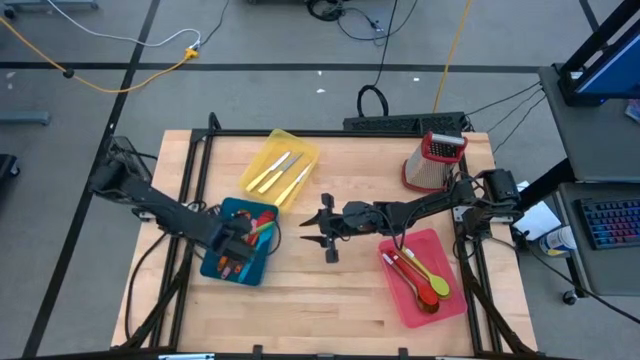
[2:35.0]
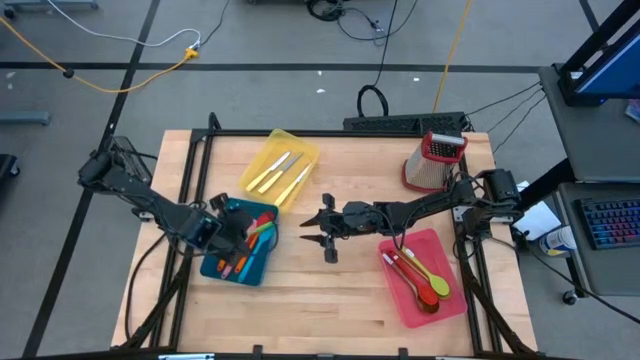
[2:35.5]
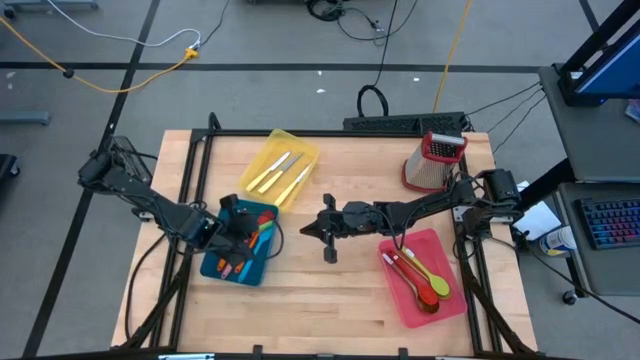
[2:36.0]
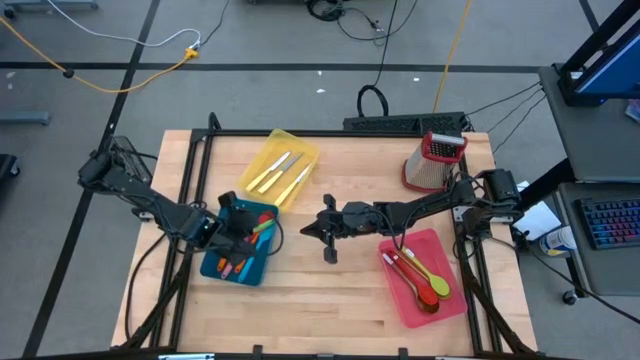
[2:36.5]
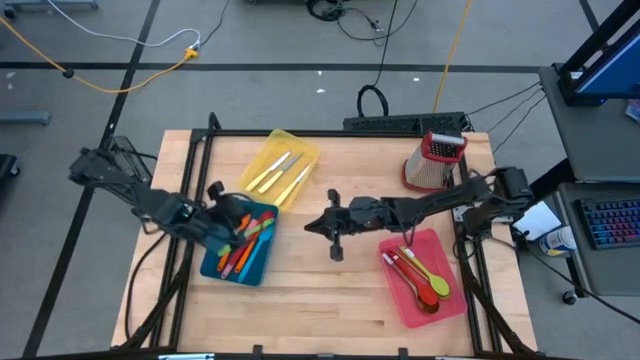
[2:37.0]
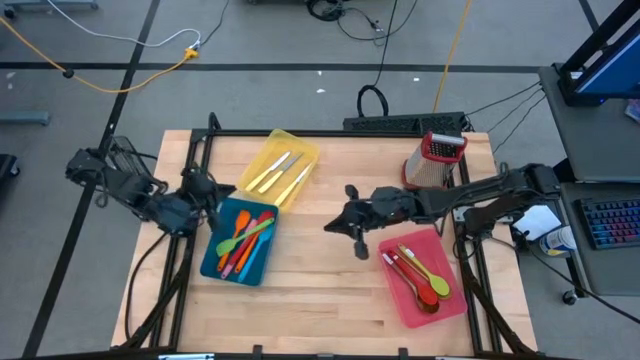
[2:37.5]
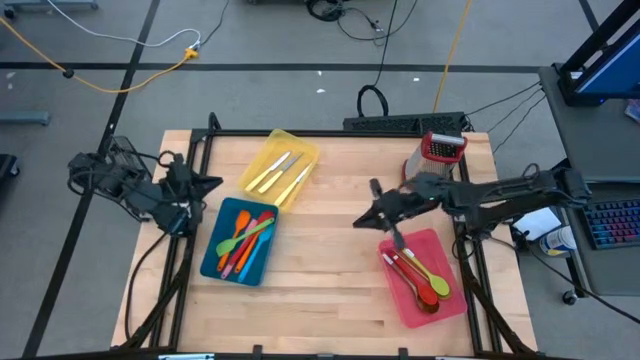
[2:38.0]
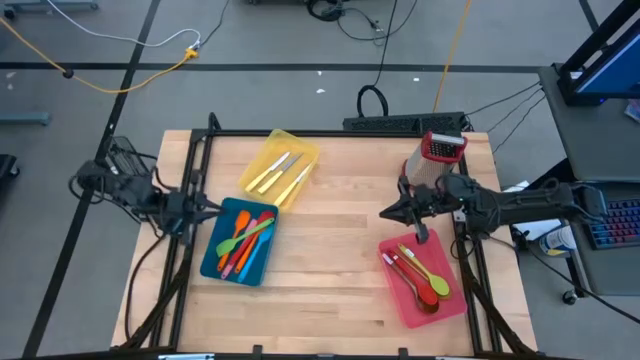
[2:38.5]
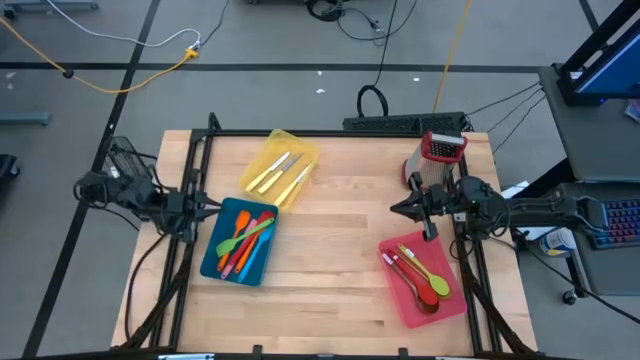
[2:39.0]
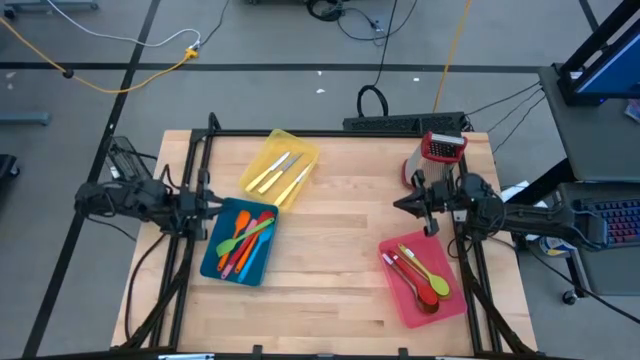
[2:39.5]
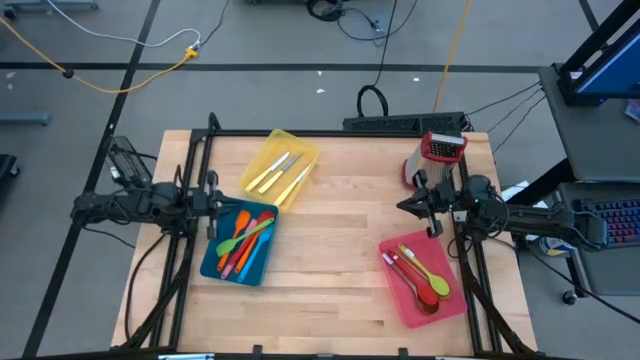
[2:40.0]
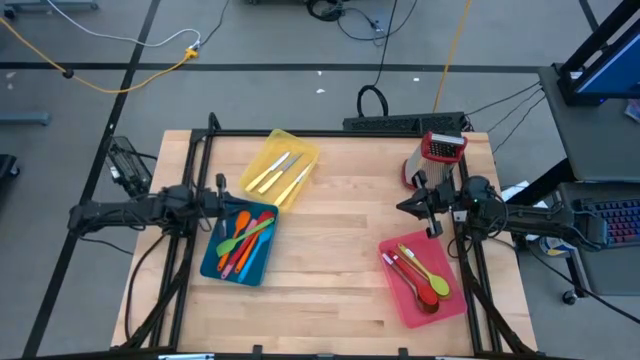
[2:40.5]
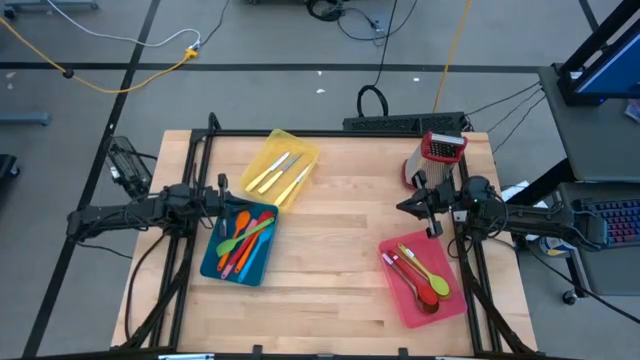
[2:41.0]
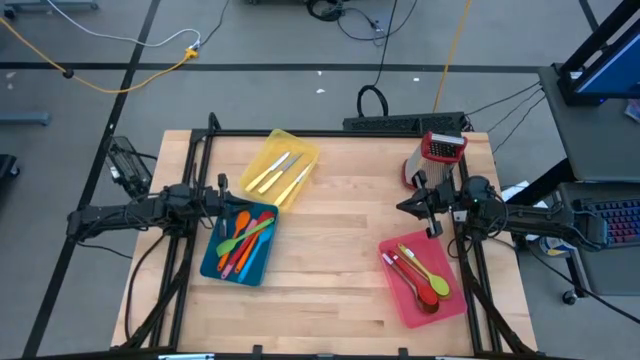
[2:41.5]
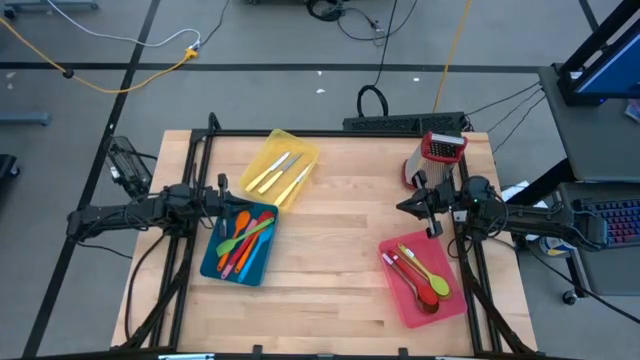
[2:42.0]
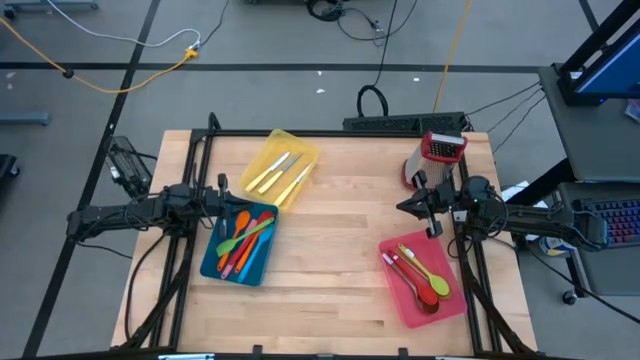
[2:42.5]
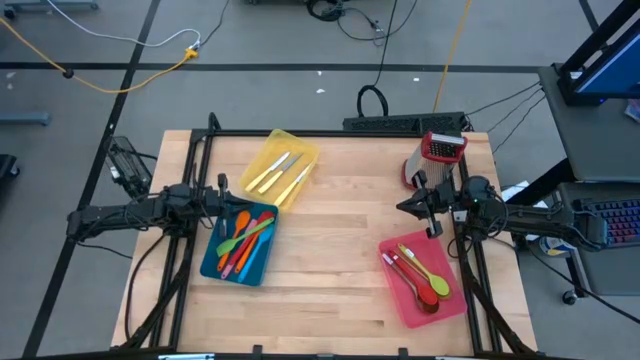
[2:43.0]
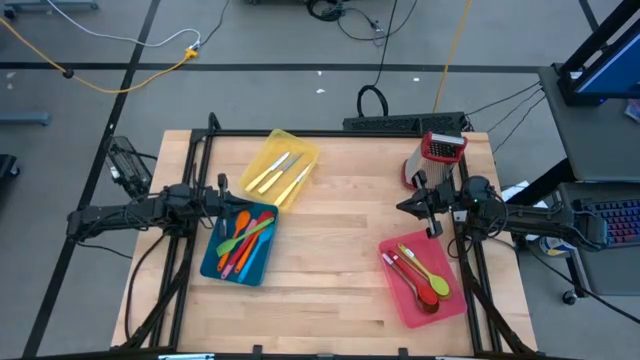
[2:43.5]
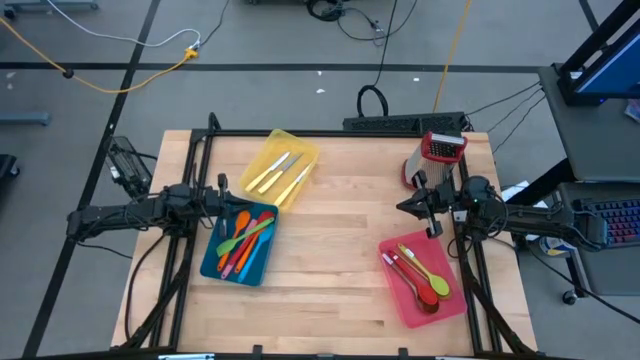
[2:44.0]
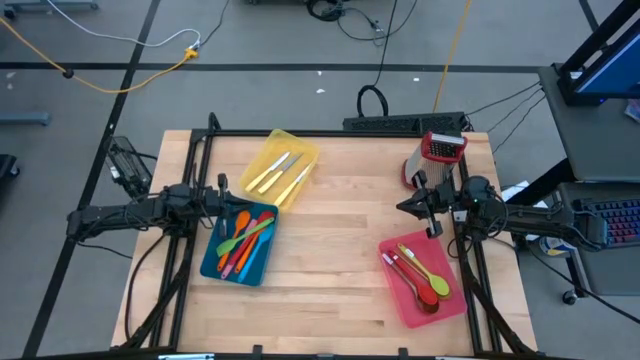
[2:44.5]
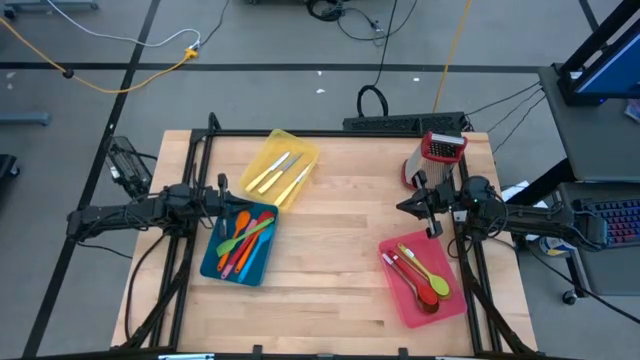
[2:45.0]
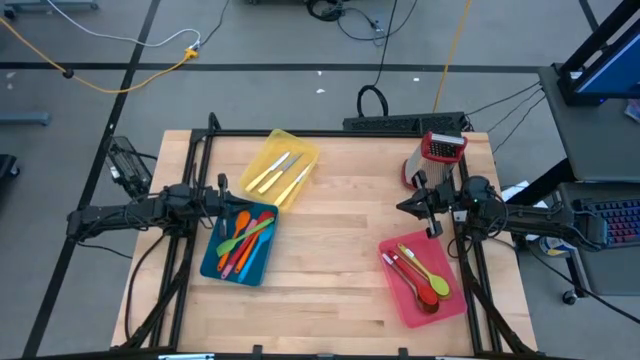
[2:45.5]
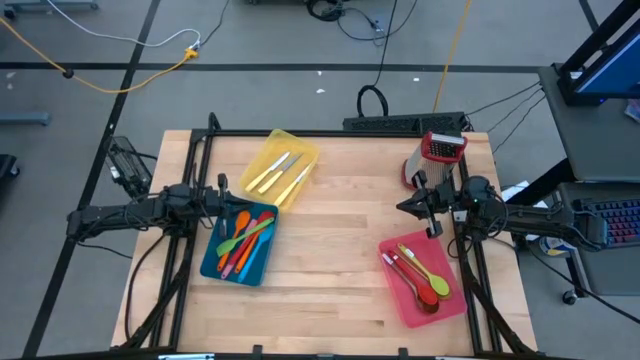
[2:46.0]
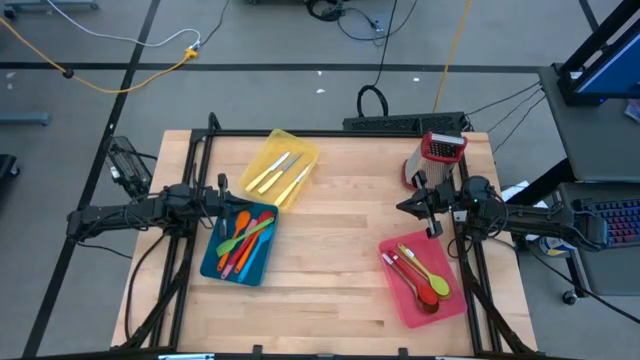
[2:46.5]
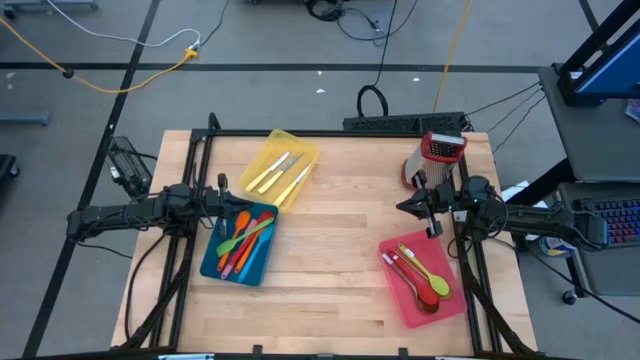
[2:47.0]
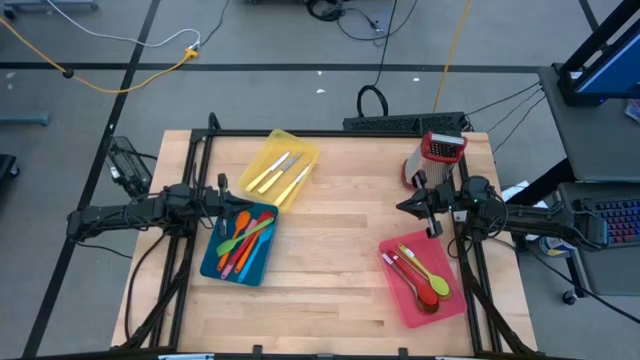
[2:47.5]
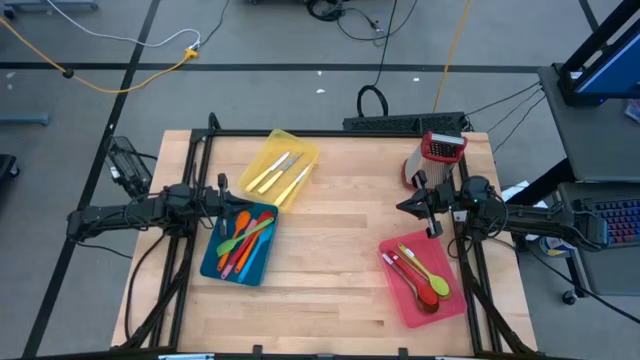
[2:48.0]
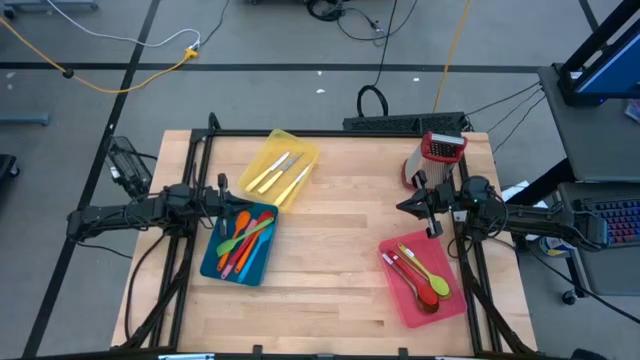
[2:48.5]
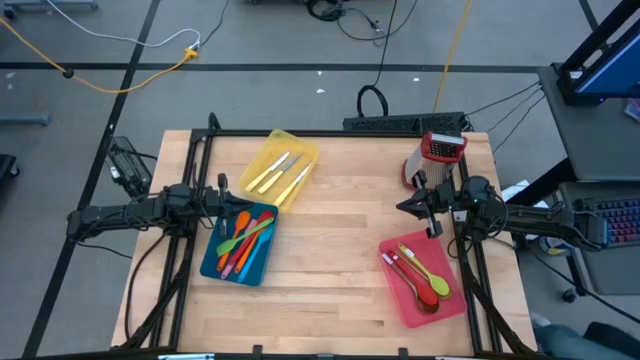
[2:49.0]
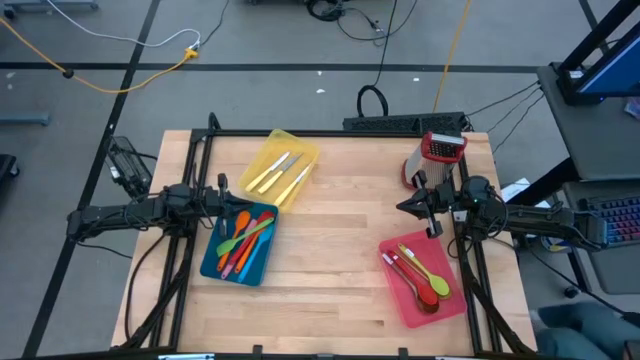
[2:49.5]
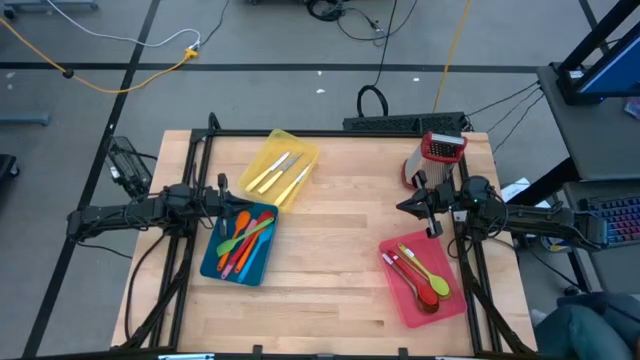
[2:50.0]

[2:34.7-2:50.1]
Task: Pick & Place Kitchen Items
Return to Home Position
